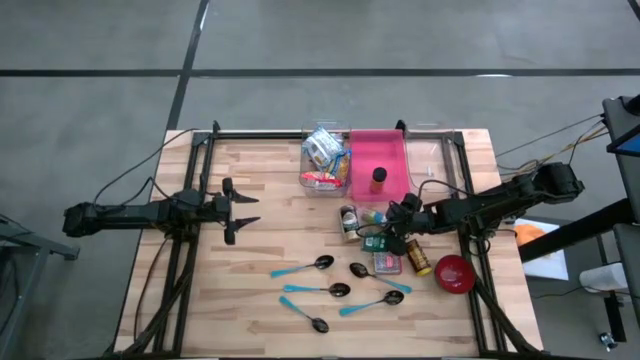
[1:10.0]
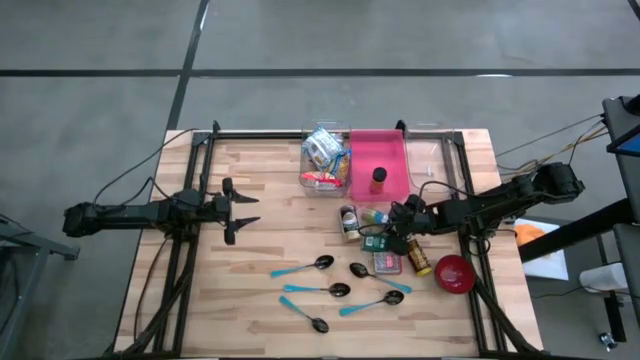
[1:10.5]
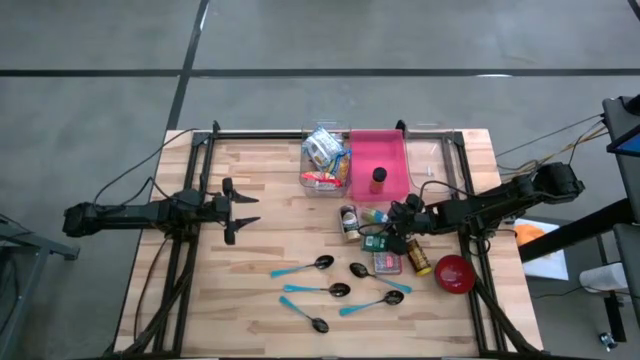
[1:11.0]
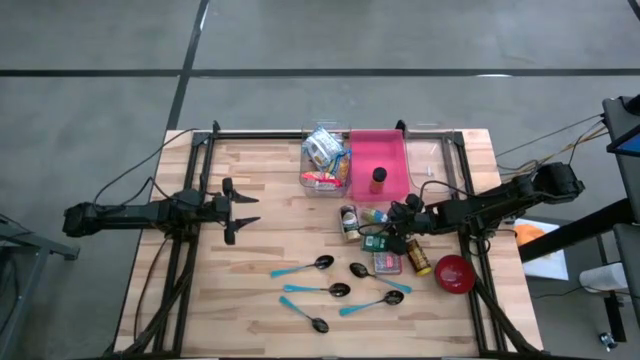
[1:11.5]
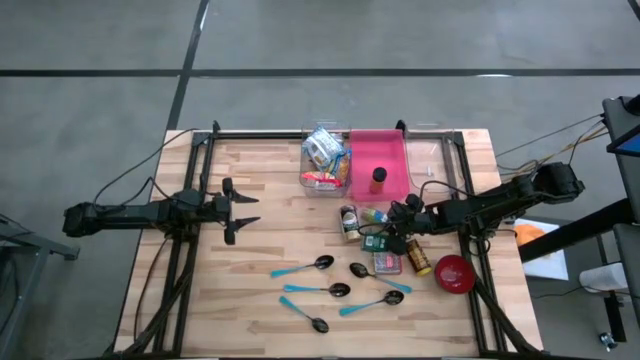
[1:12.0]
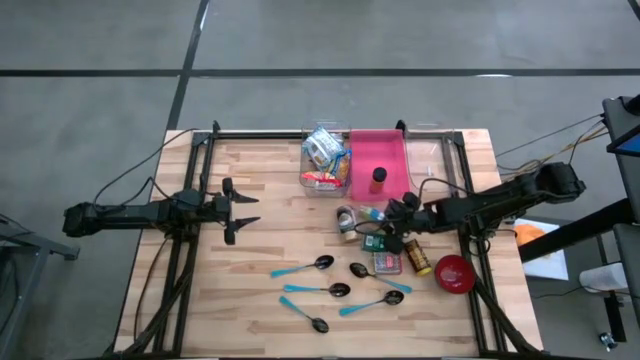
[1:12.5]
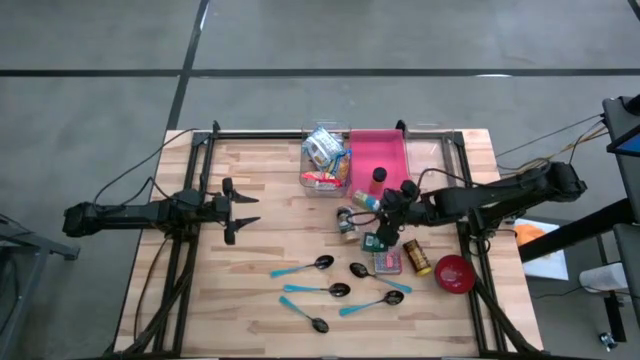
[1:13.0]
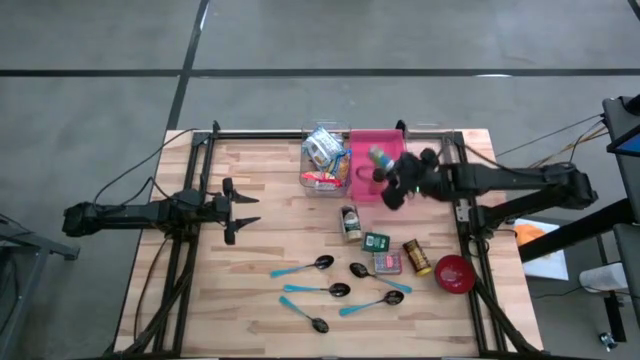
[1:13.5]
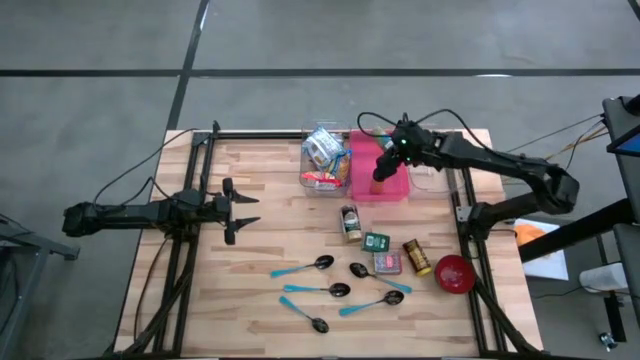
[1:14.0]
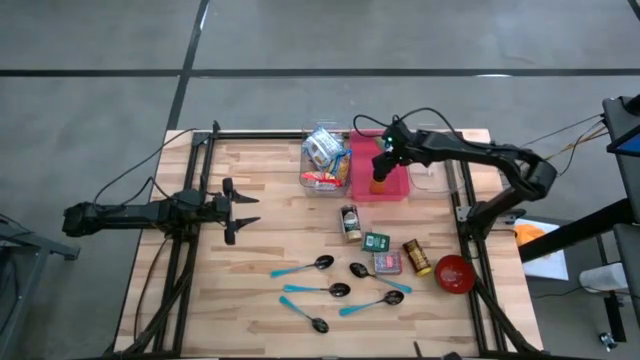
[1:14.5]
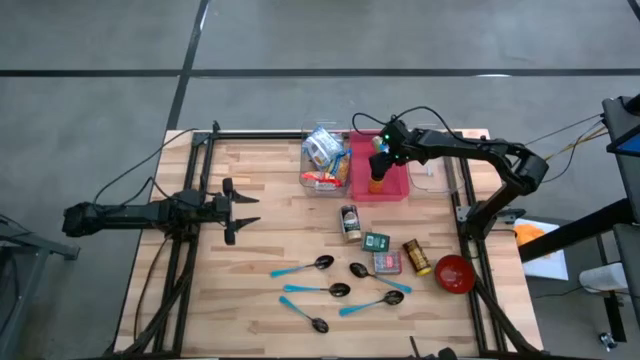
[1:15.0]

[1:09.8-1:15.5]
Put the green spice bottle into the pink bin

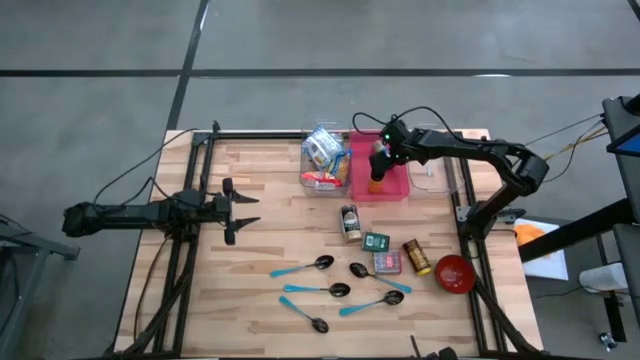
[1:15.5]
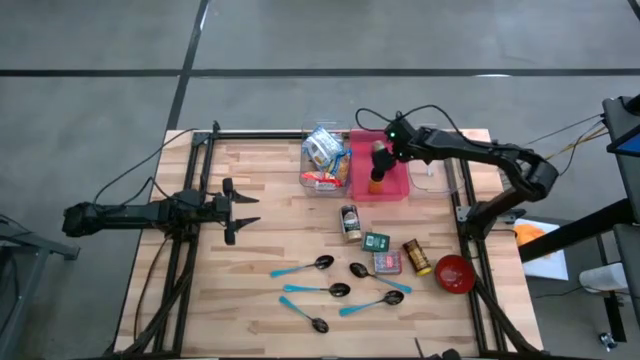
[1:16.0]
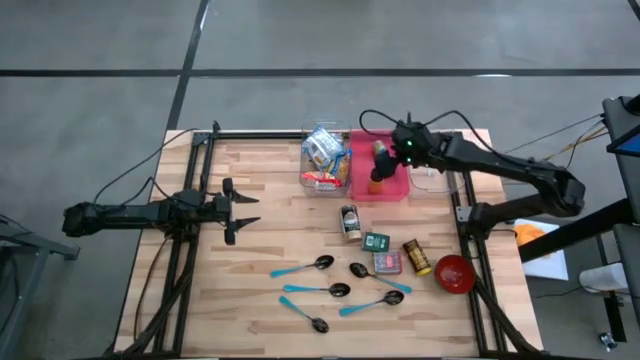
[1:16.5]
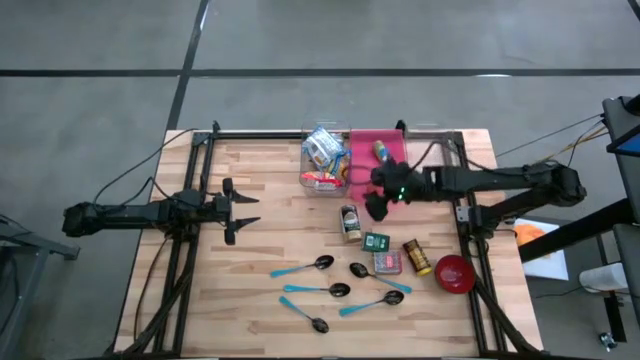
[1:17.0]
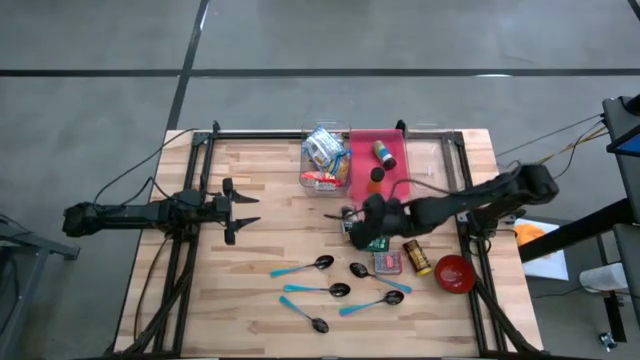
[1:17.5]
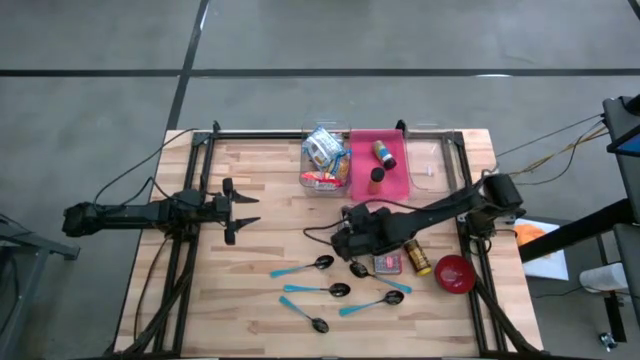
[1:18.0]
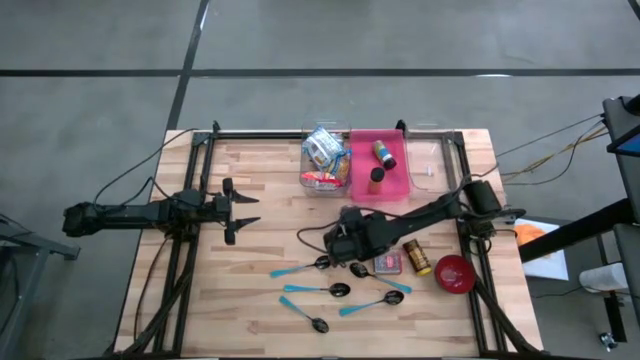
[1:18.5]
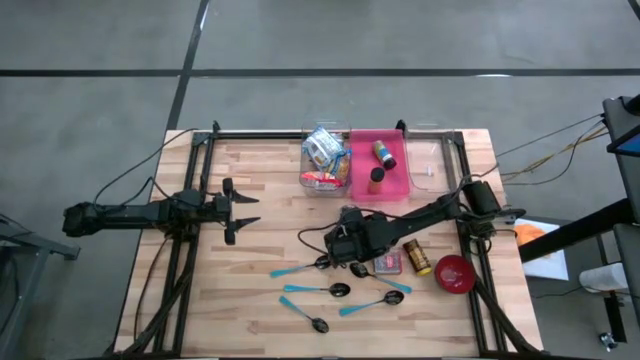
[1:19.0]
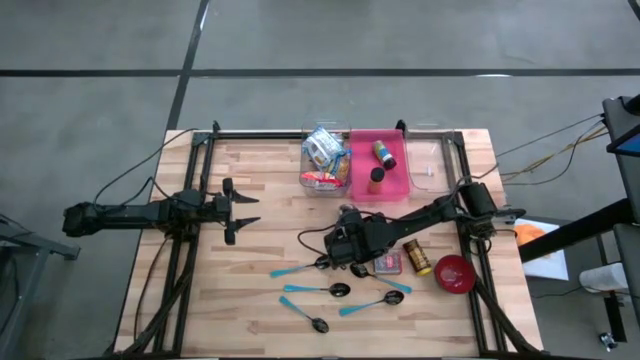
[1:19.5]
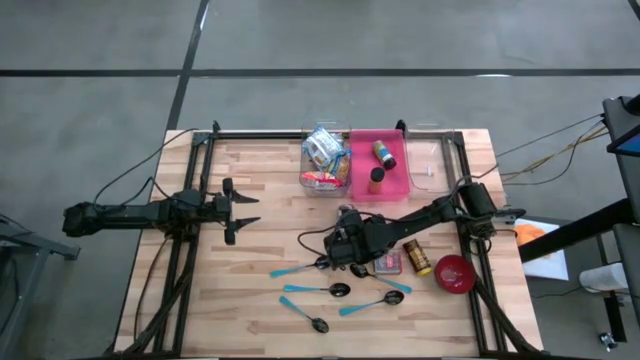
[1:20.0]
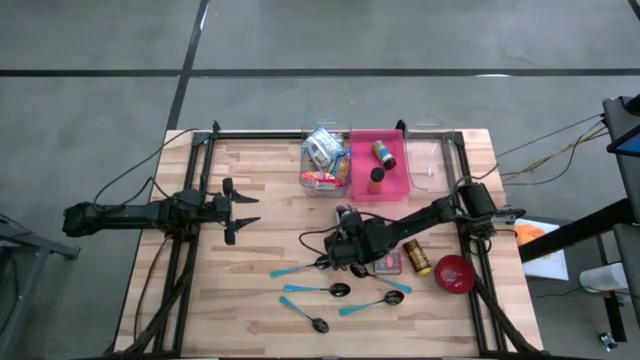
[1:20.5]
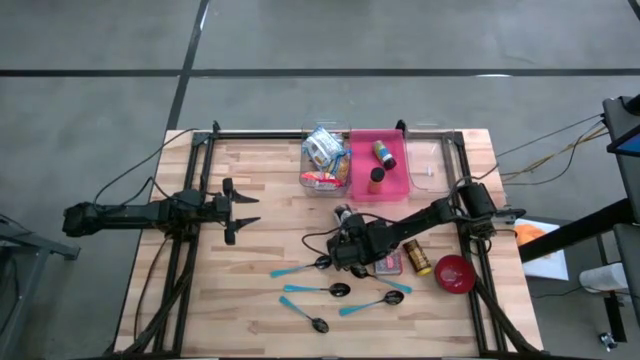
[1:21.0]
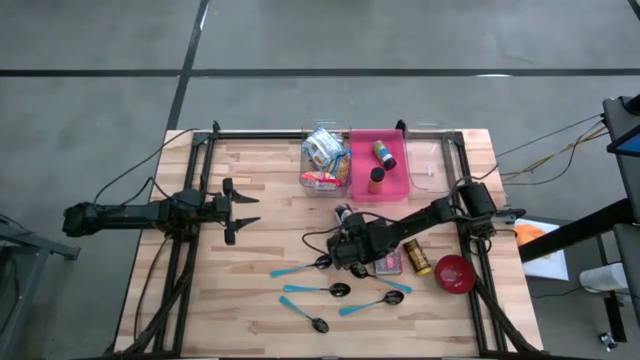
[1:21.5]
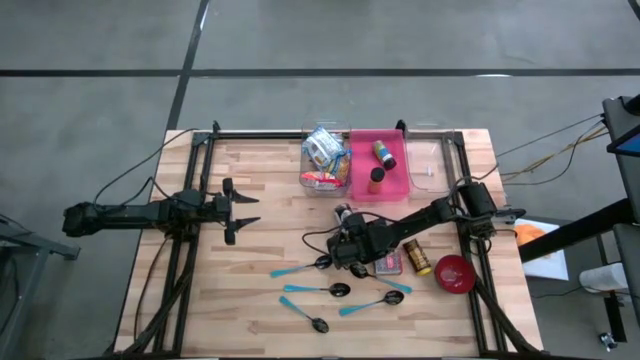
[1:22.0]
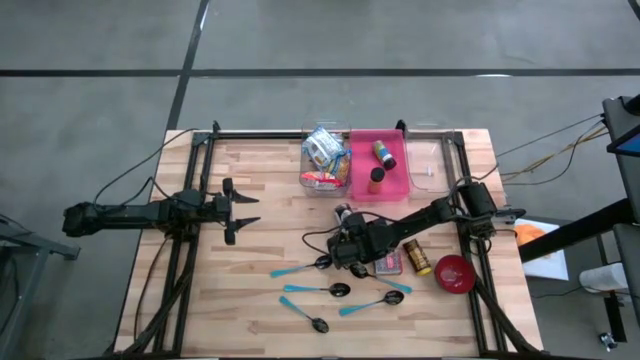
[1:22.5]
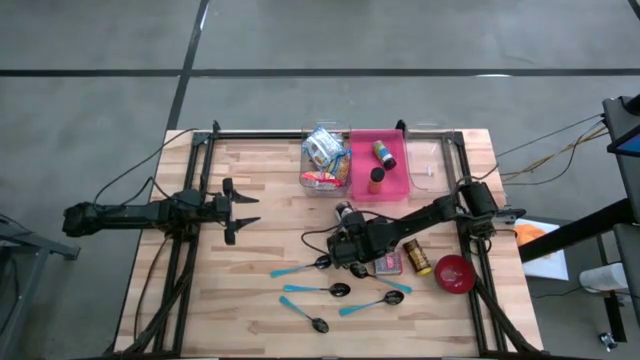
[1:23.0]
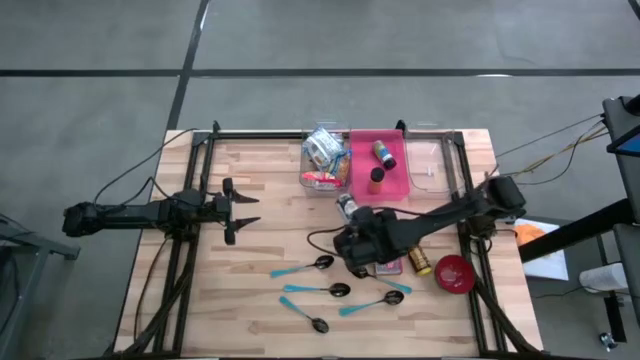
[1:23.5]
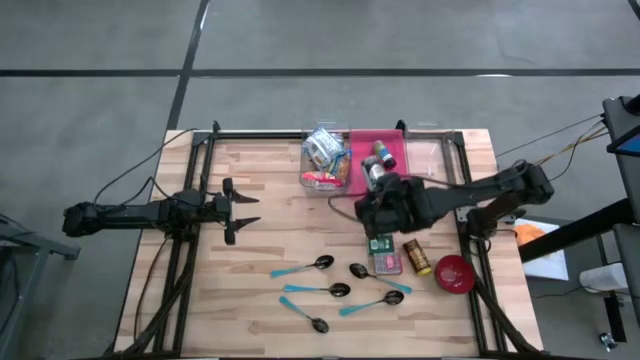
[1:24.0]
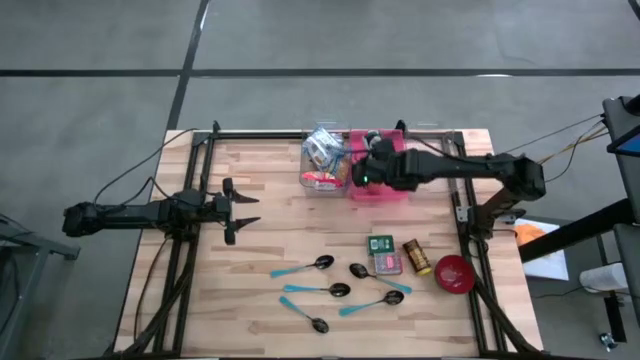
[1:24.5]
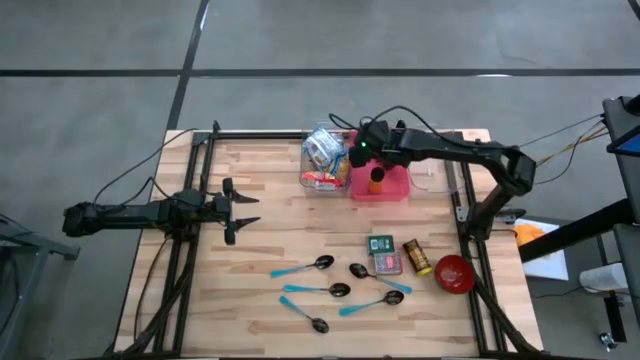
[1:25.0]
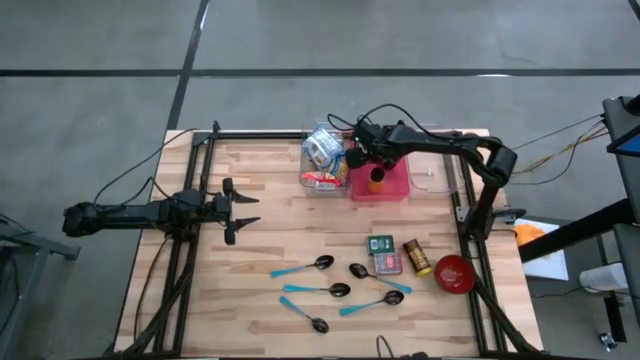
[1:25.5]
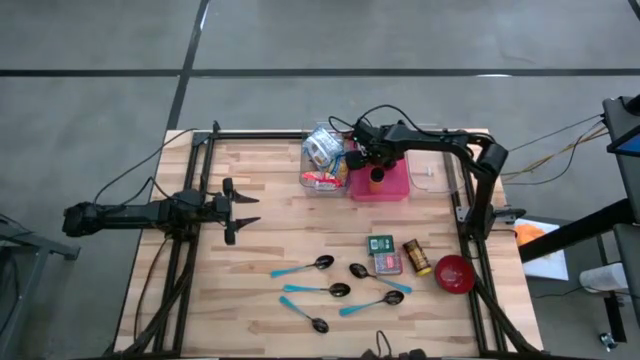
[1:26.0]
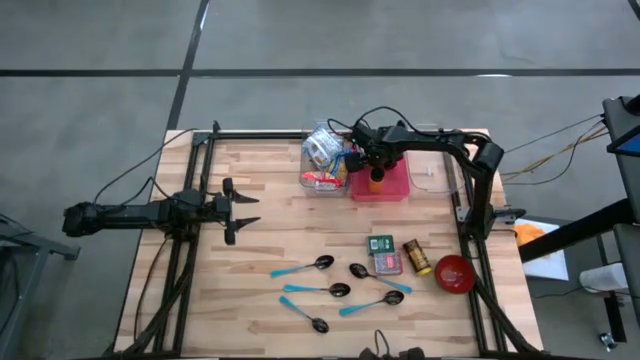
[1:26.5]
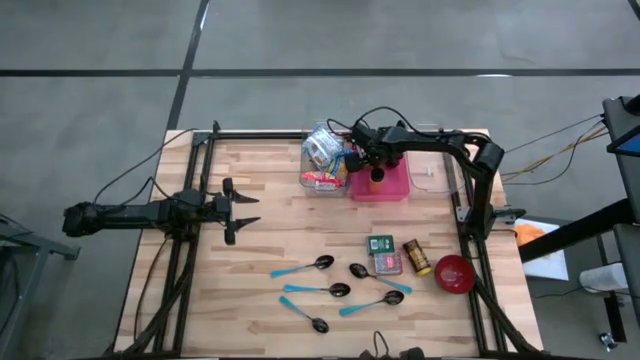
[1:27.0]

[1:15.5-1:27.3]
Put the gold spice bottle into the pink bin

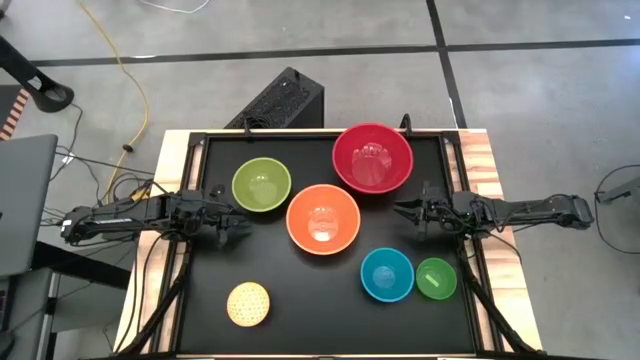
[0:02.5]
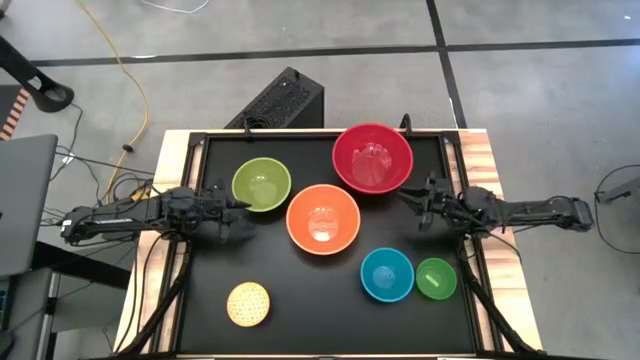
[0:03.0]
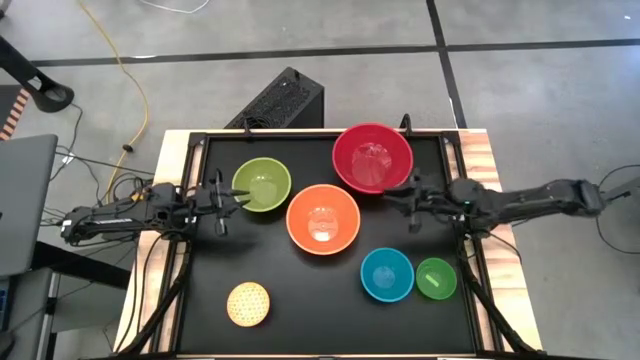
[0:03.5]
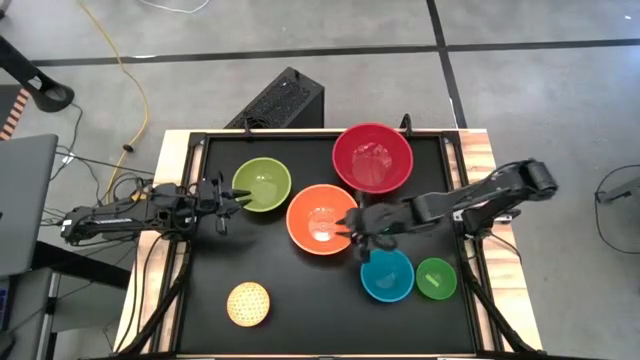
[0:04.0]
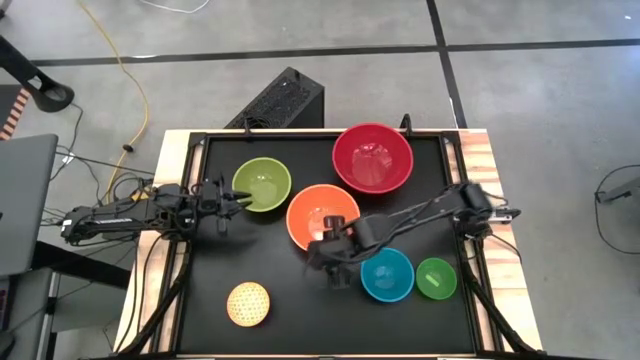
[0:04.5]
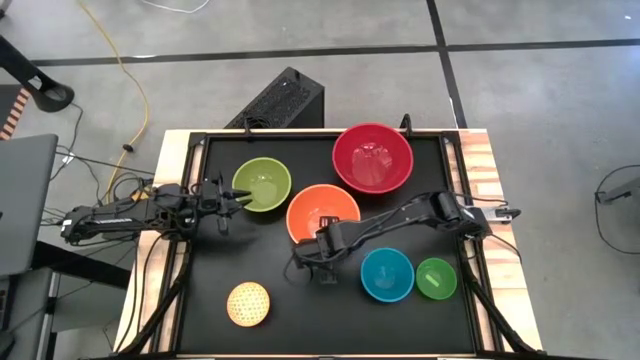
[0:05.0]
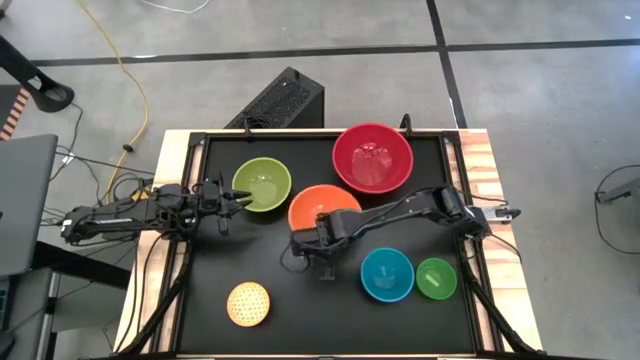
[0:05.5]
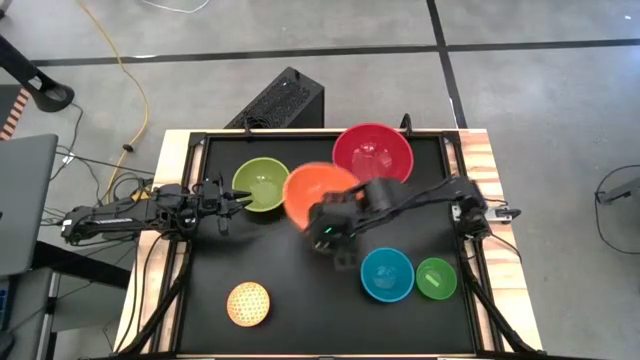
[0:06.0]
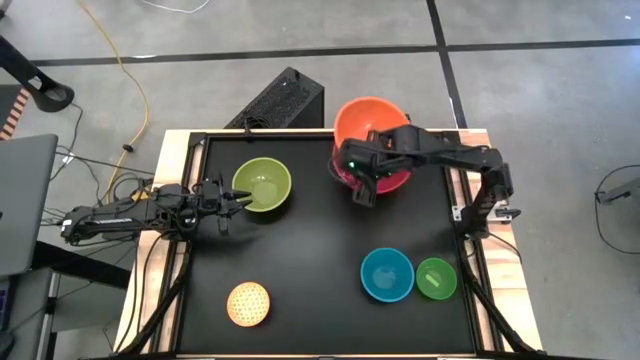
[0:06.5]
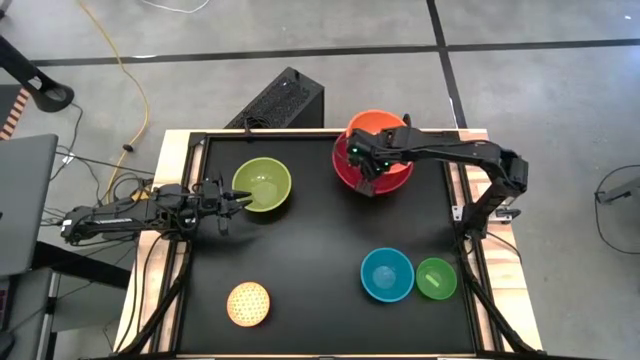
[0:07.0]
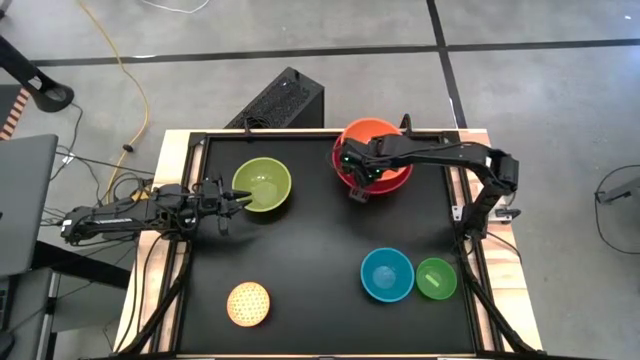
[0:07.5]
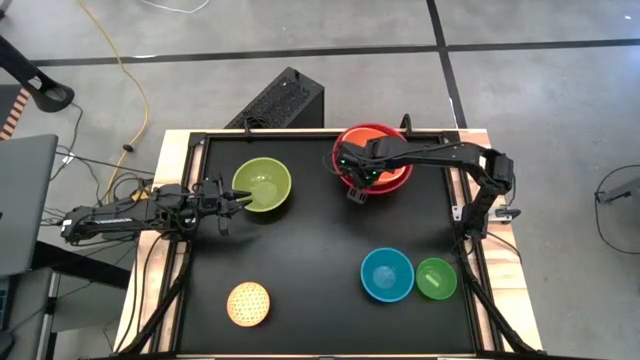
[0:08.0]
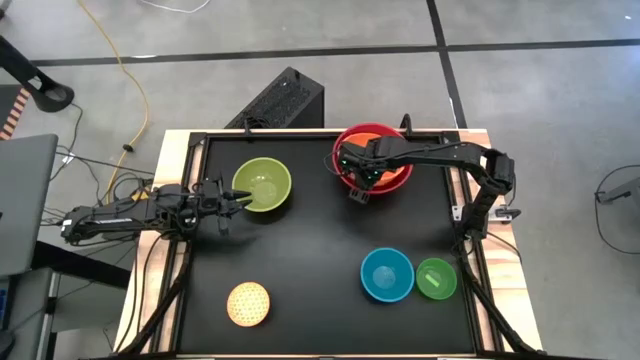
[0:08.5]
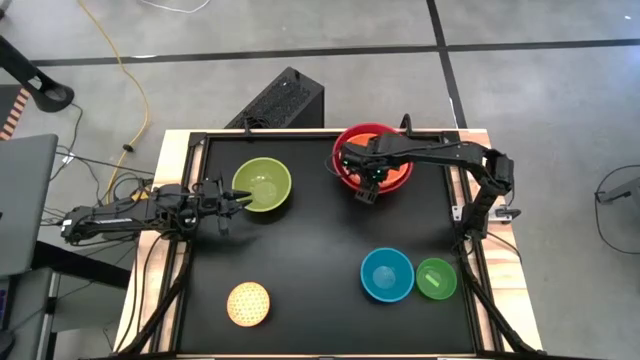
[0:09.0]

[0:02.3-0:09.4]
Stack the orange bowl on top of the red bowl
